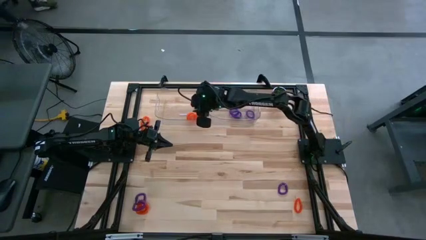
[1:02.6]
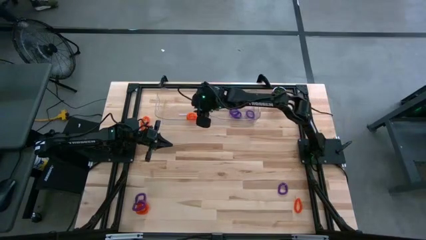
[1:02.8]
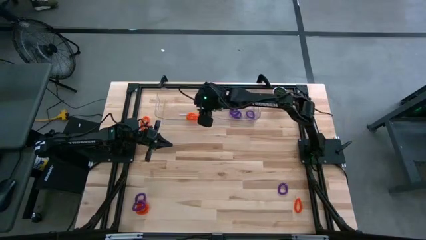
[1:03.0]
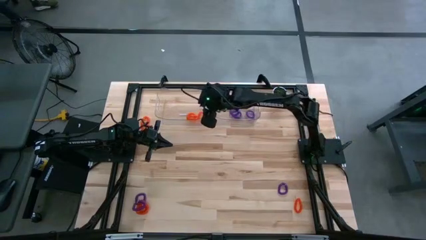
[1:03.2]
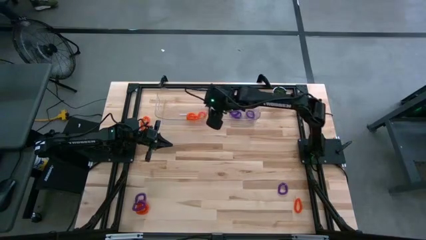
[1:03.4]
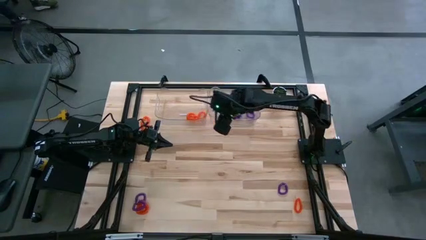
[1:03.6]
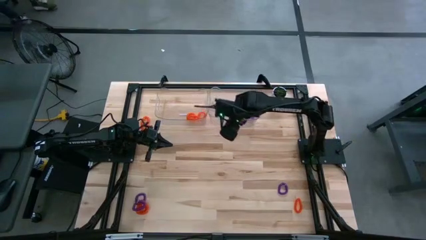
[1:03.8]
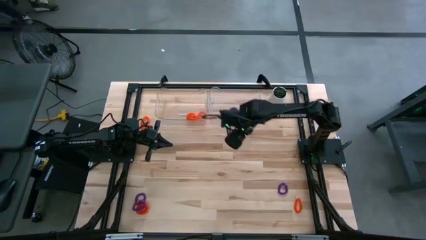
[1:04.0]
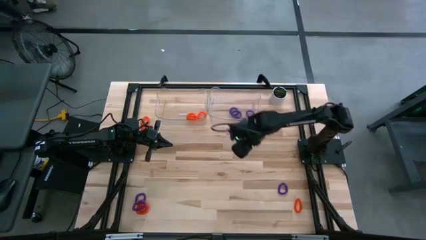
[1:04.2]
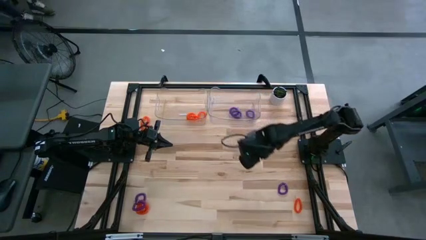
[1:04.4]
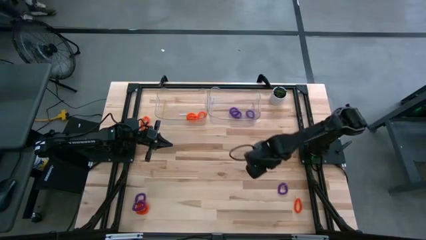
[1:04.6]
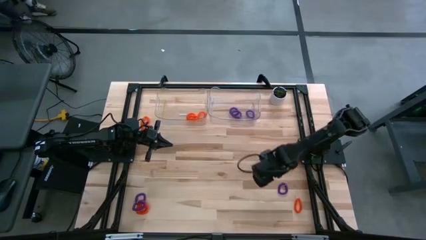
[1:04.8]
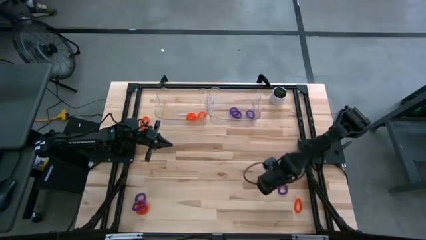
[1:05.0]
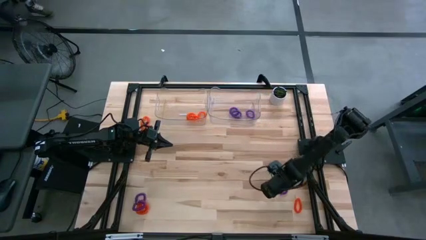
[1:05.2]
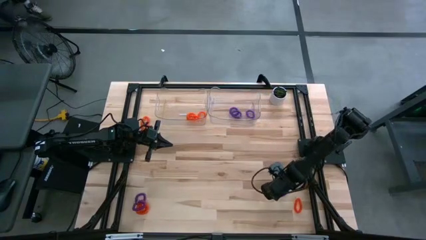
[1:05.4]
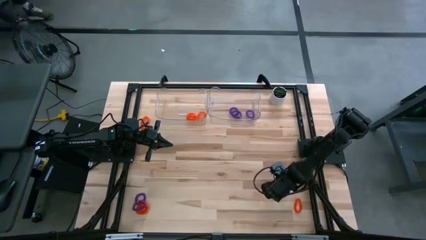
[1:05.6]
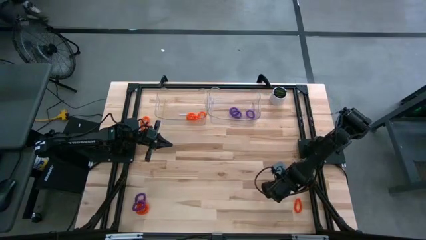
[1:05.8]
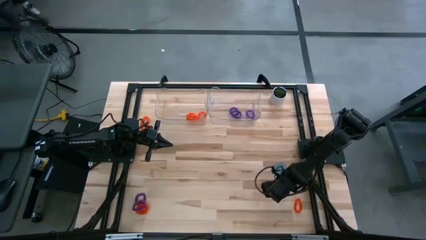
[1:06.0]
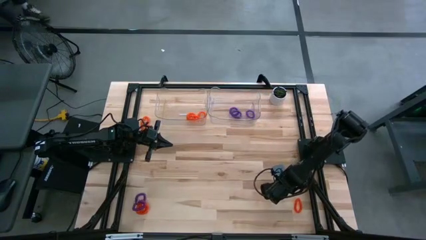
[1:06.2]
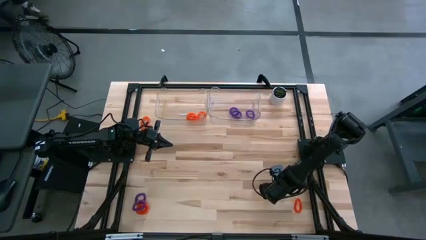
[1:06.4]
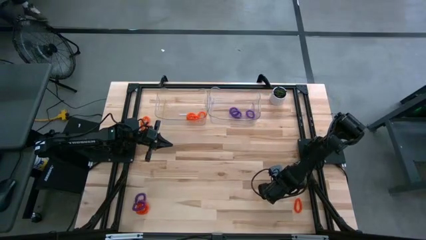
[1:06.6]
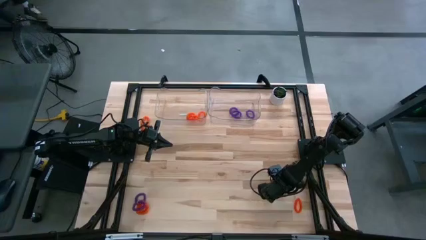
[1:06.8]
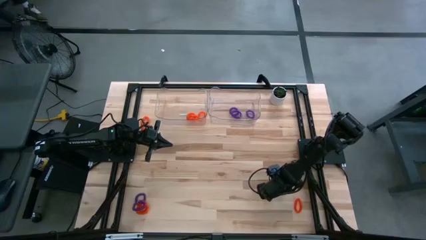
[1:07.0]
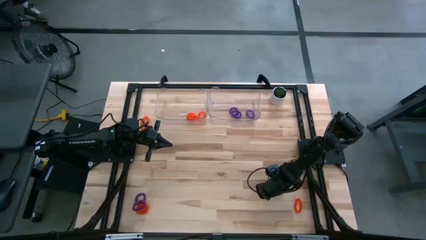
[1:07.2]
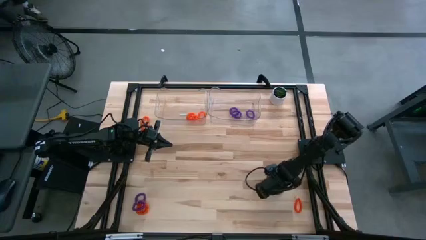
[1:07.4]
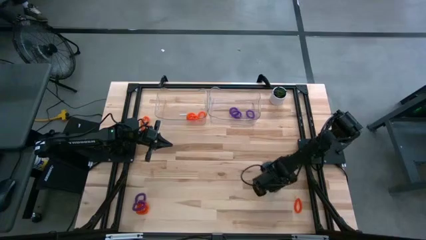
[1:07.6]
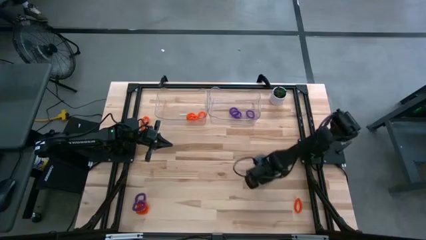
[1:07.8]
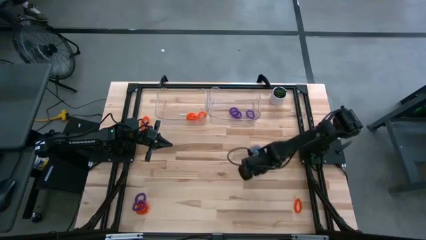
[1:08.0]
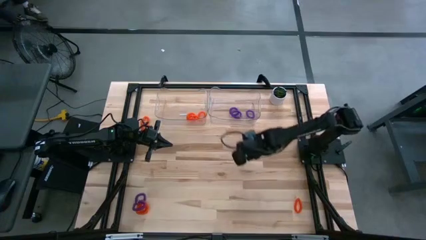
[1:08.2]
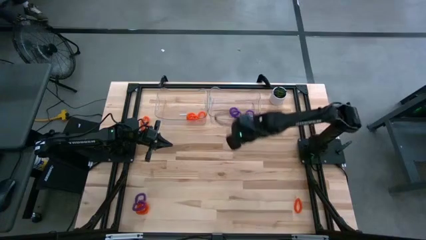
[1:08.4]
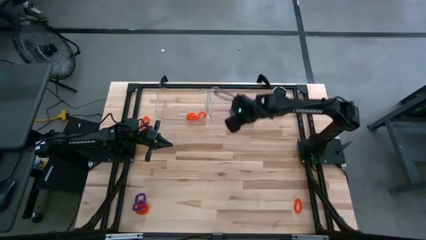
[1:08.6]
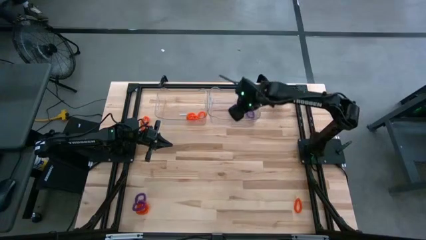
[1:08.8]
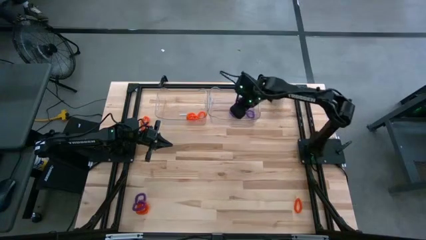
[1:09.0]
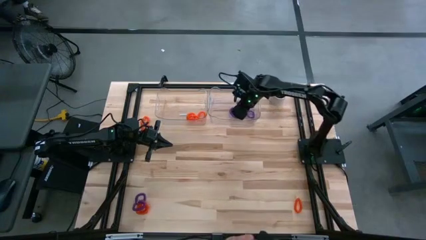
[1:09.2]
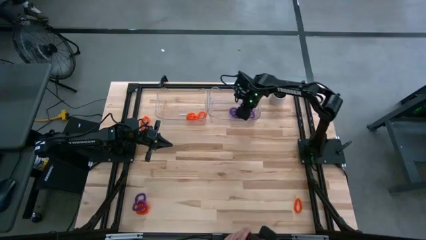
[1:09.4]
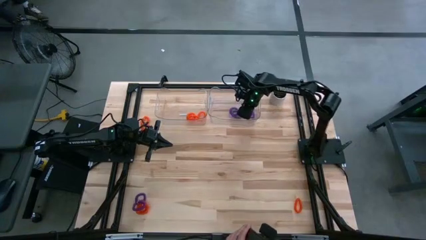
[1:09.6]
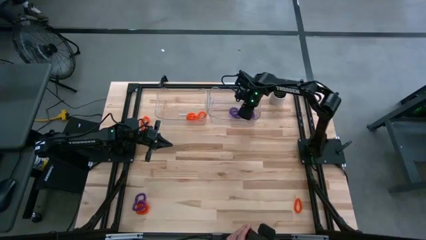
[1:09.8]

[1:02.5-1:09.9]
Task: Sort spring keychains
Put the violet spring keychain into the right transparent bin

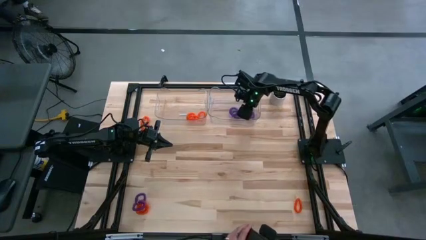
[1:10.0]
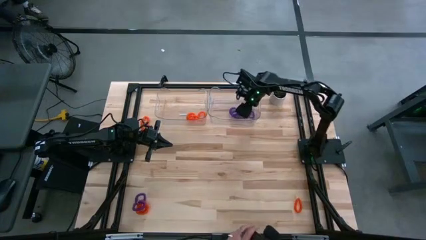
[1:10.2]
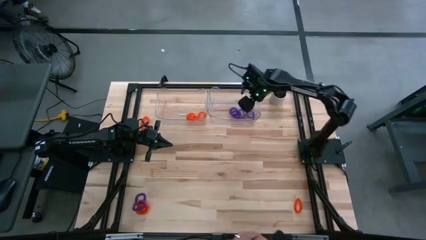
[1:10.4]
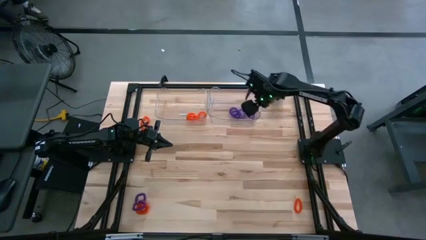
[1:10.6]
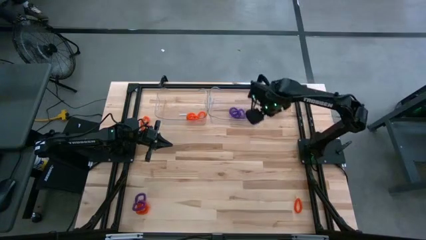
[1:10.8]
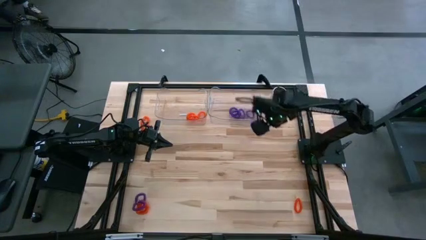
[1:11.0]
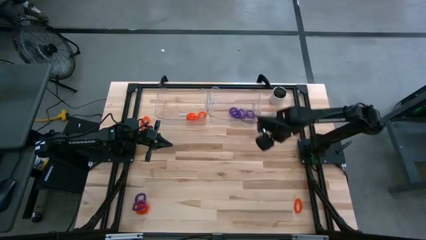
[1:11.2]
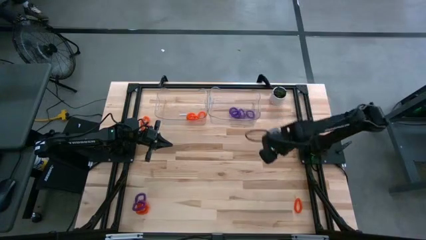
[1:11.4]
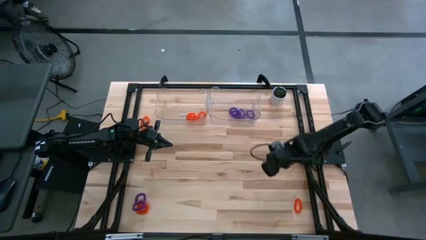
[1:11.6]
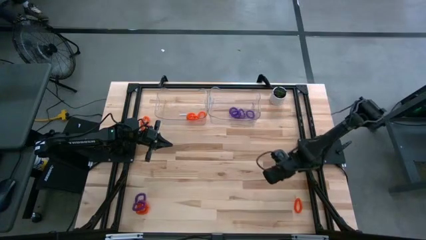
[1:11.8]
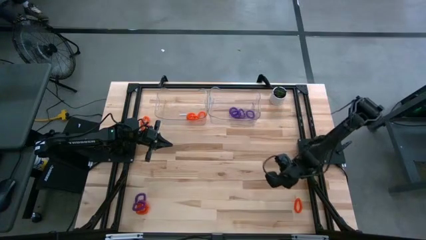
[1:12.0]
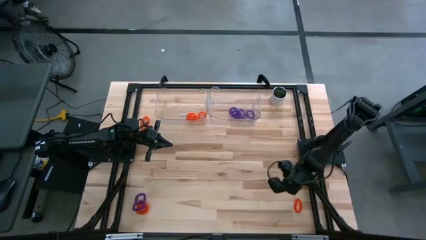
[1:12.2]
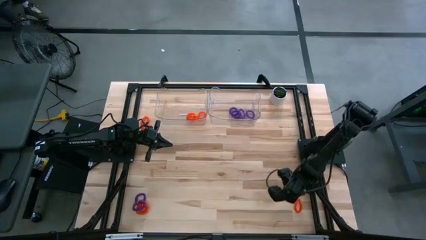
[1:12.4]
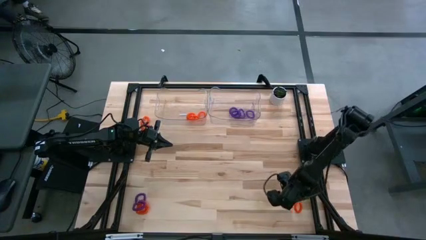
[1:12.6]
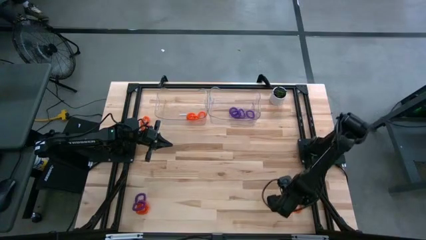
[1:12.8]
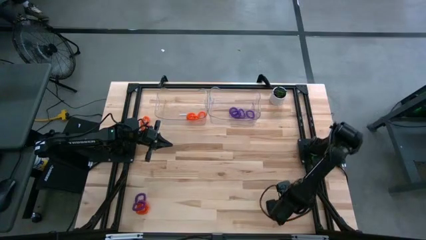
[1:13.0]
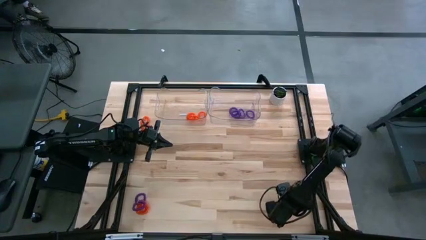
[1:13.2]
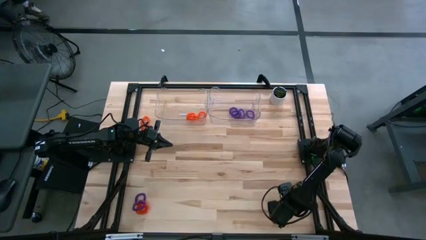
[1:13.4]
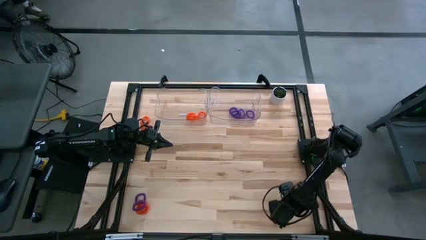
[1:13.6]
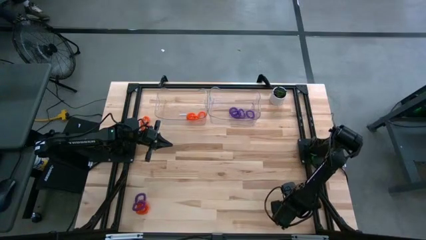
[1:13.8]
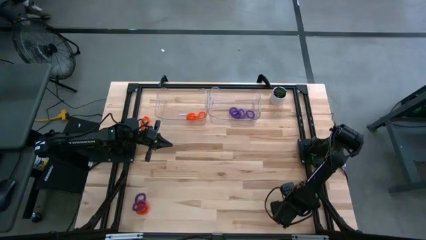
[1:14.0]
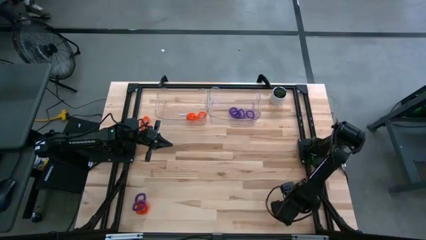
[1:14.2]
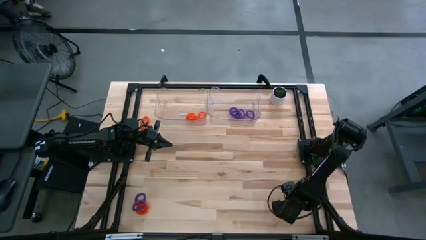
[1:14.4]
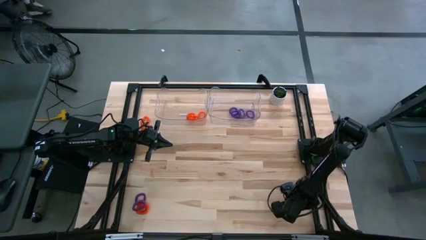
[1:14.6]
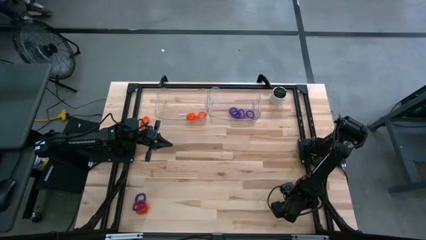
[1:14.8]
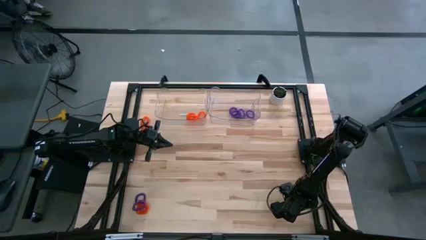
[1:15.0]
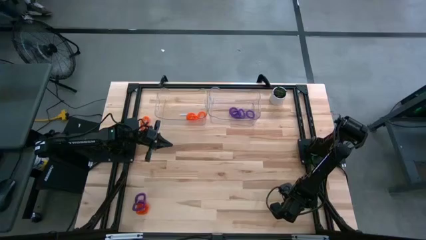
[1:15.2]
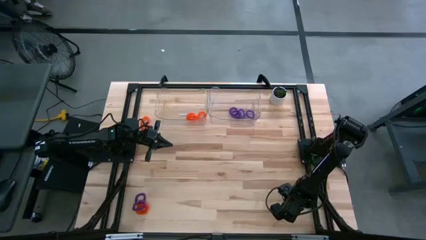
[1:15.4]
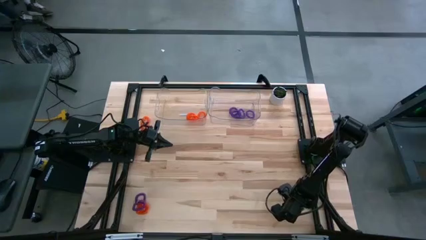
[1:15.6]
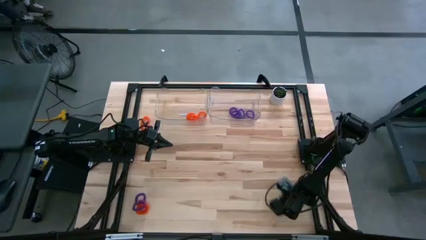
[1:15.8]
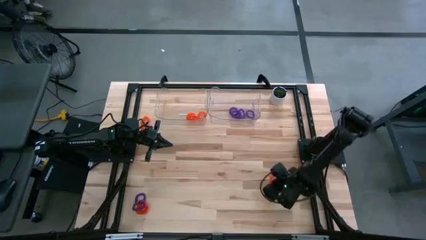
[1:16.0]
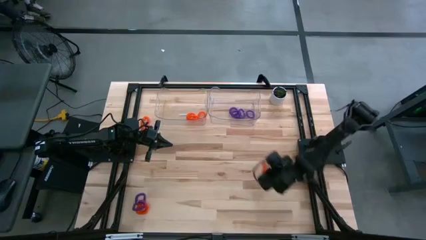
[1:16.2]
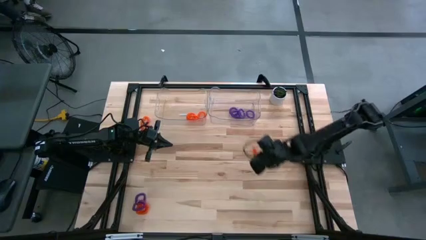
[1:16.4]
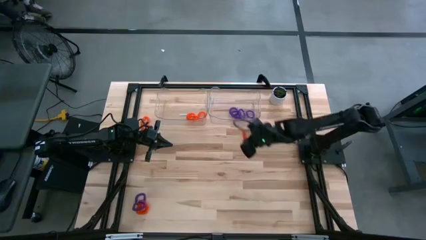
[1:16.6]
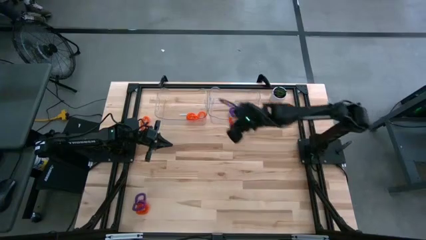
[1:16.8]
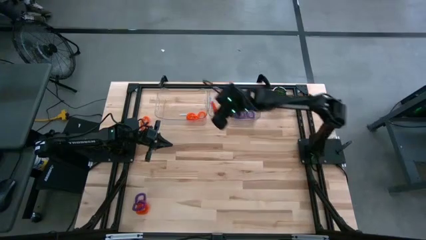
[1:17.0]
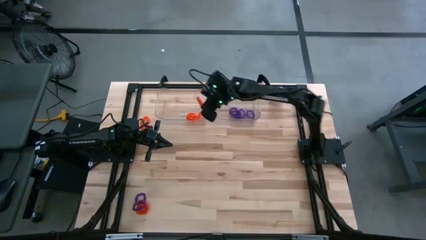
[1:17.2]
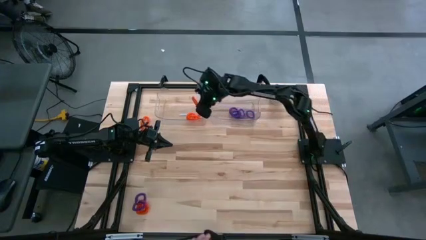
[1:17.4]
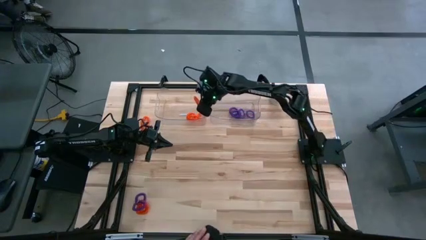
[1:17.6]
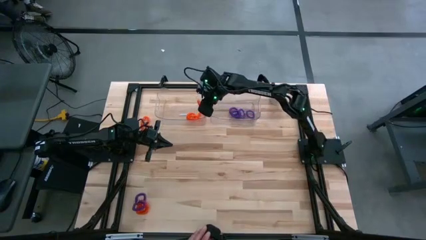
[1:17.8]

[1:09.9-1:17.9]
Put the orange spring keychain into the left transparent bin
